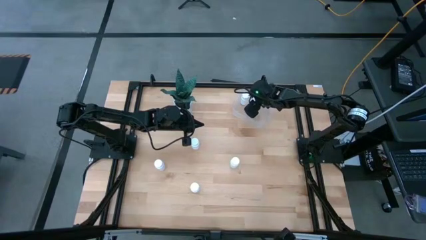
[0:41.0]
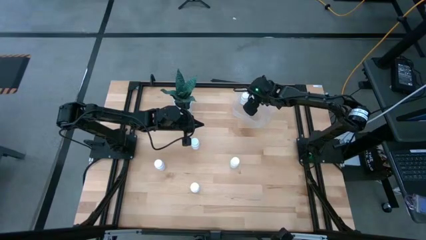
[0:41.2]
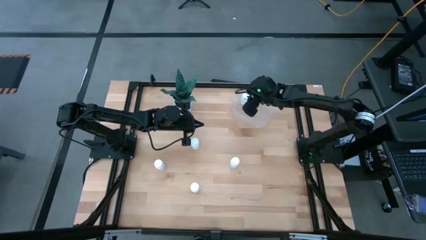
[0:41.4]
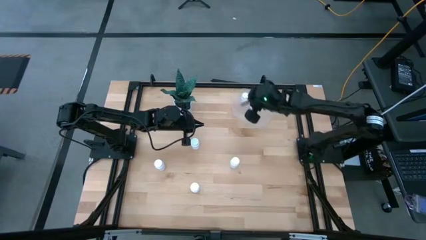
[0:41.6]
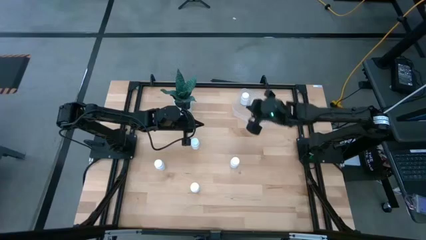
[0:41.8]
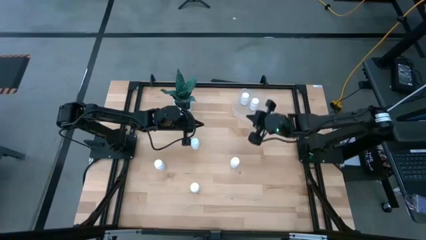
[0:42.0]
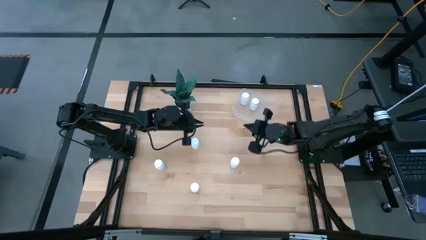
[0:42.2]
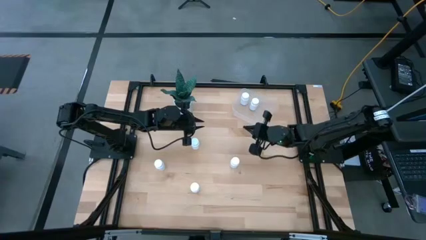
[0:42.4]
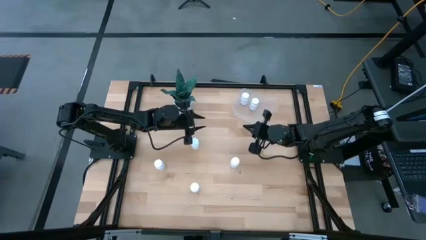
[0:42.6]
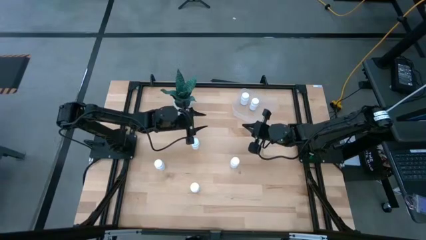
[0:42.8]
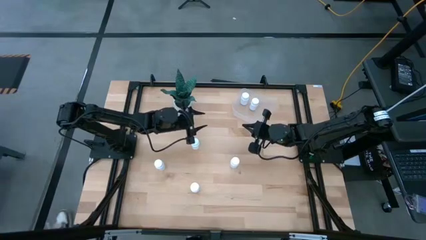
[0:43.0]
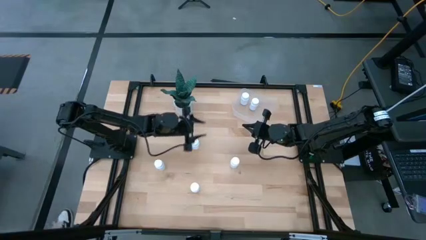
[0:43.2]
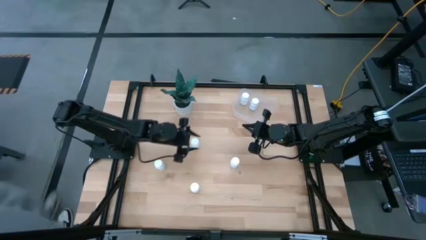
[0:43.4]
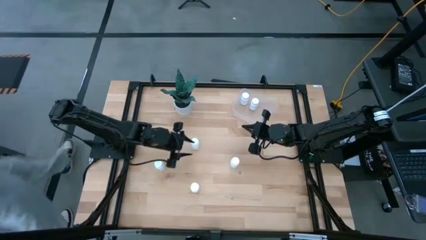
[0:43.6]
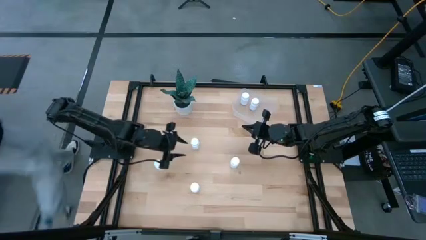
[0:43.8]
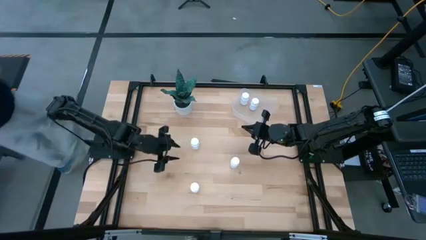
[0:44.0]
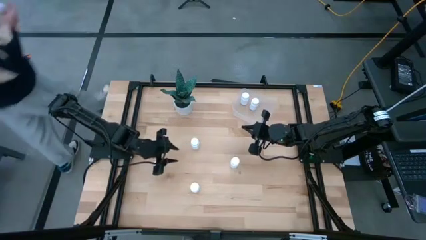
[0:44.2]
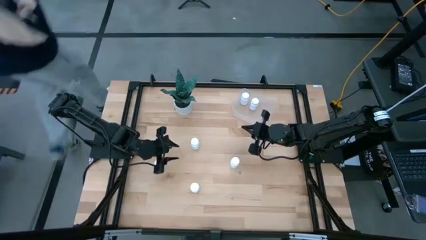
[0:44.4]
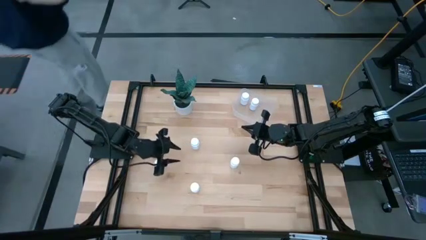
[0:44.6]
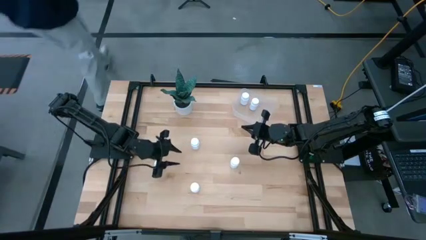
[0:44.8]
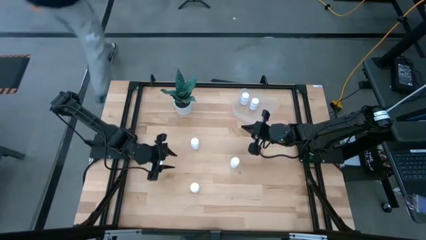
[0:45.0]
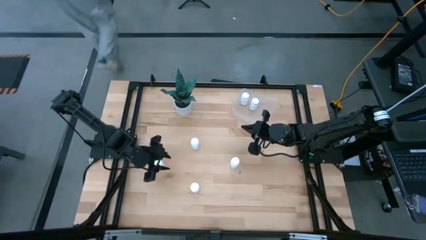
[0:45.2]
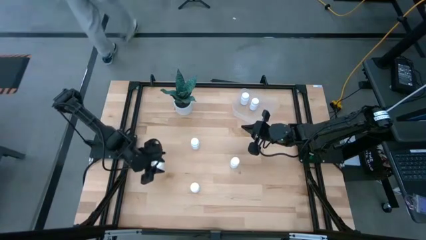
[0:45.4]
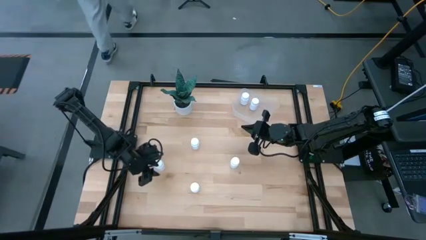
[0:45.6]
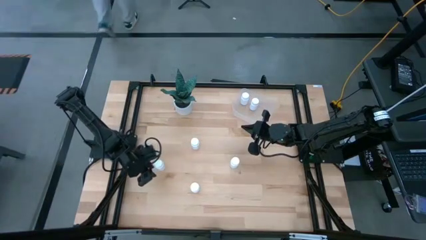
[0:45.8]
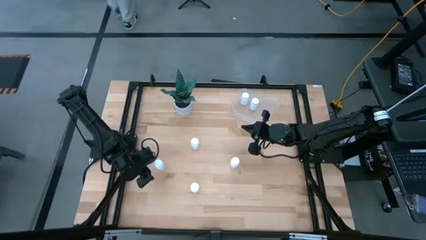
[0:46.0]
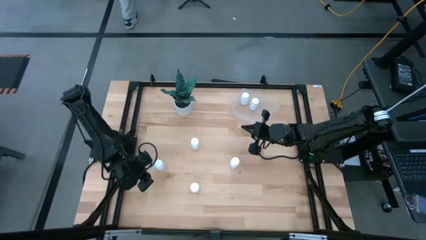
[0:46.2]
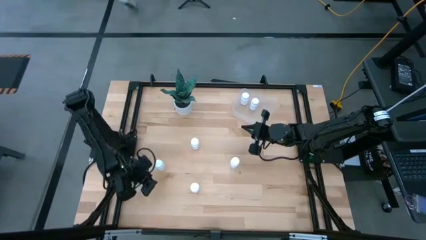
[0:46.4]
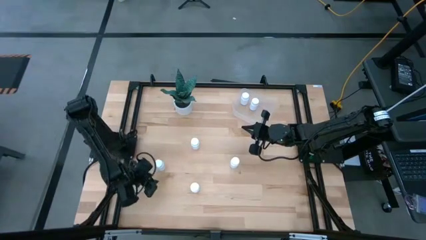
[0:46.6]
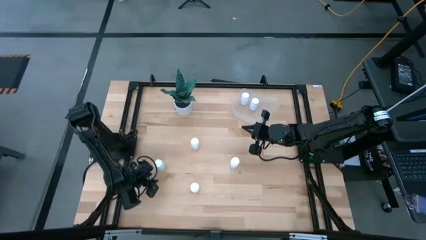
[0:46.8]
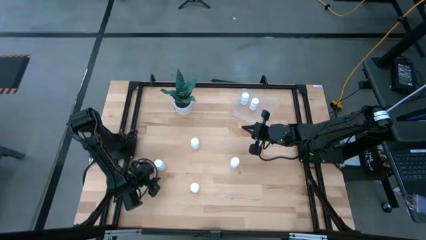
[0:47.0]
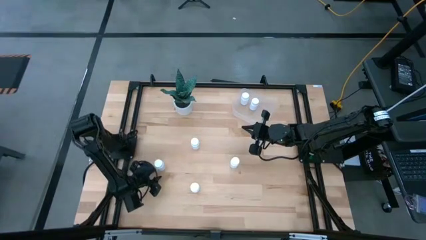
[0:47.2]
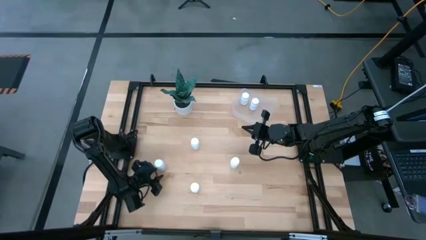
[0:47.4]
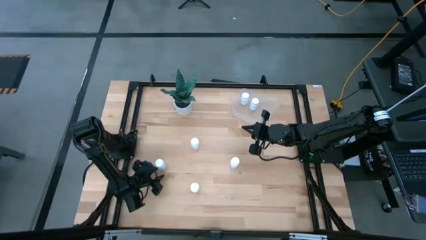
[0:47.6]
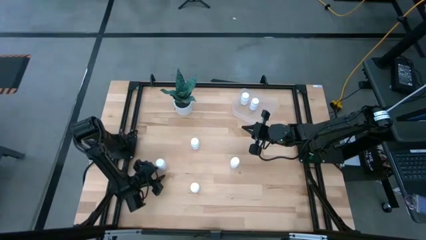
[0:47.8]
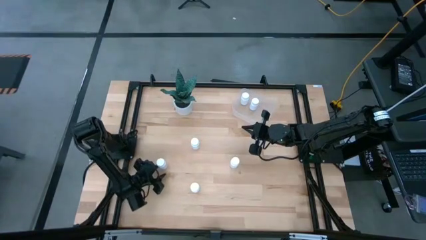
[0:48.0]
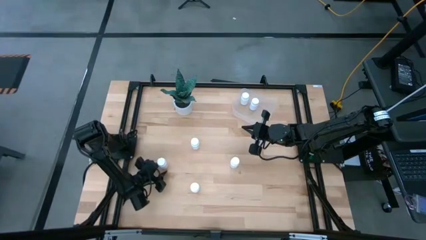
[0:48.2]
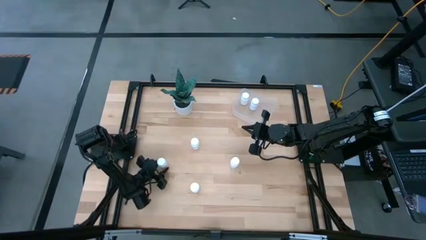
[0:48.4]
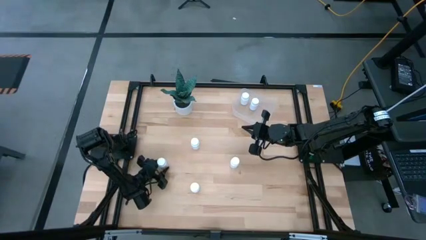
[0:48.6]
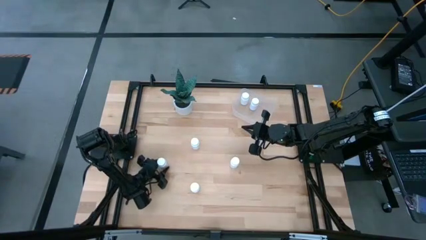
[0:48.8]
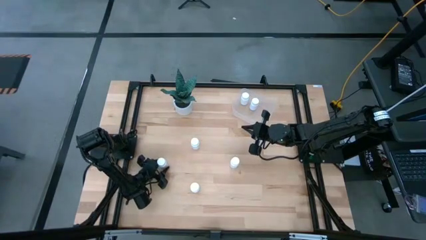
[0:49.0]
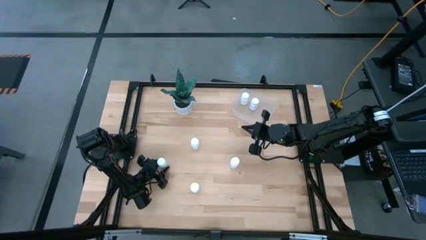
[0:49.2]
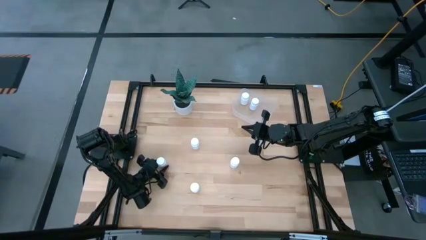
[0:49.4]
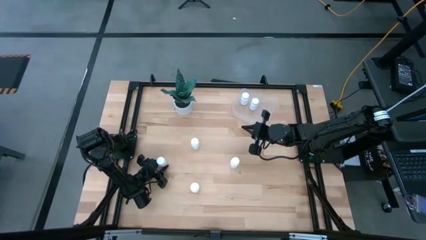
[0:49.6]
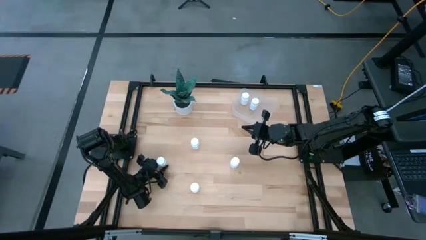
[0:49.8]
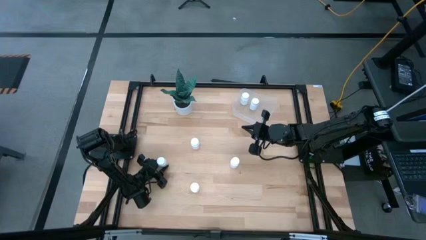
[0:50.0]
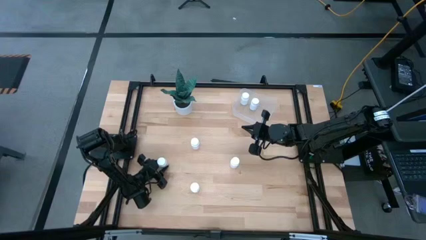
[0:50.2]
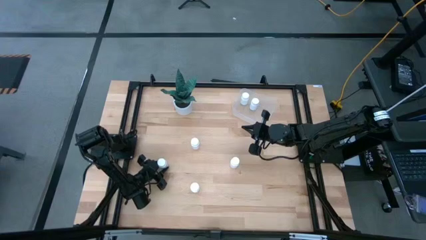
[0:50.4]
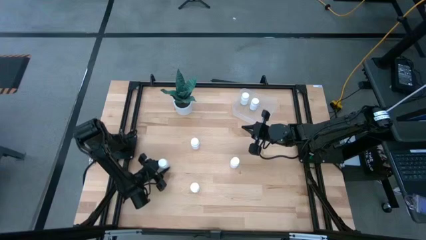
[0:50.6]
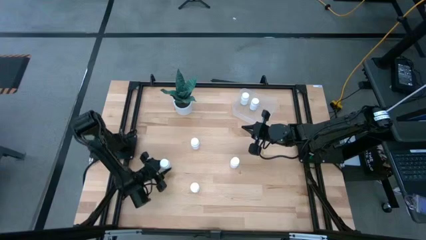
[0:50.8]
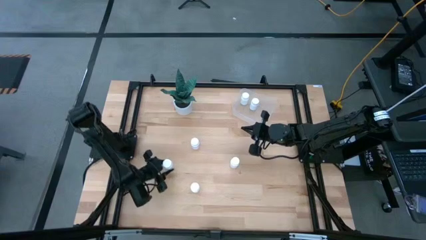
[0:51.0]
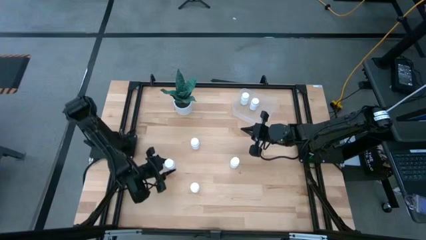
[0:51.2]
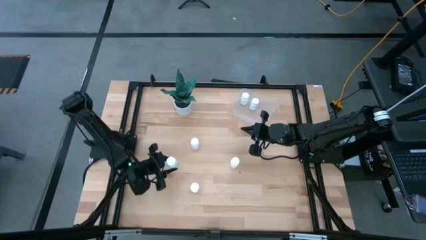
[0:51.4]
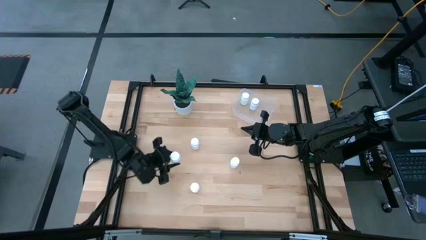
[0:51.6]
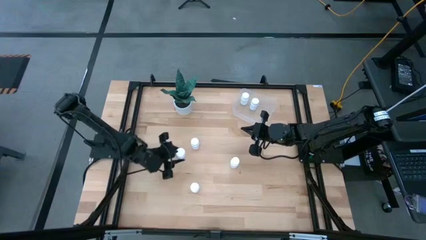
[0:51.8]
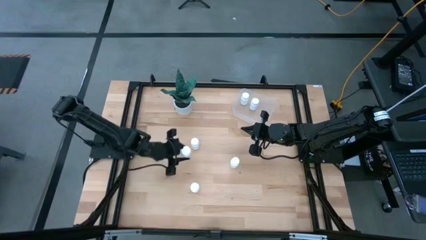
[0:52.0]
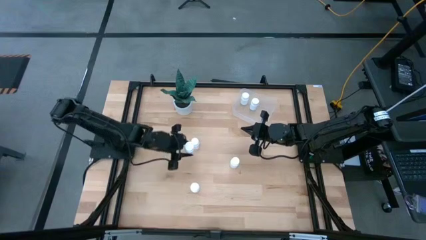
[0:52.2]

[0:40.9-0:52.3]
Task: Pick and place pill bottles into a basket
Put the white pill bottle into the transparent bin
